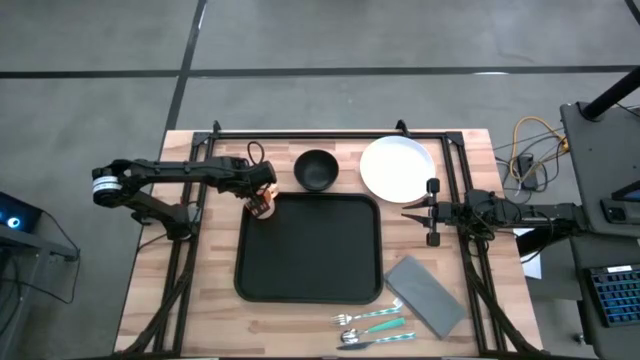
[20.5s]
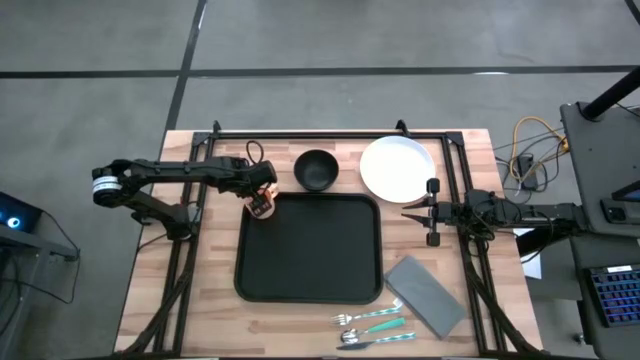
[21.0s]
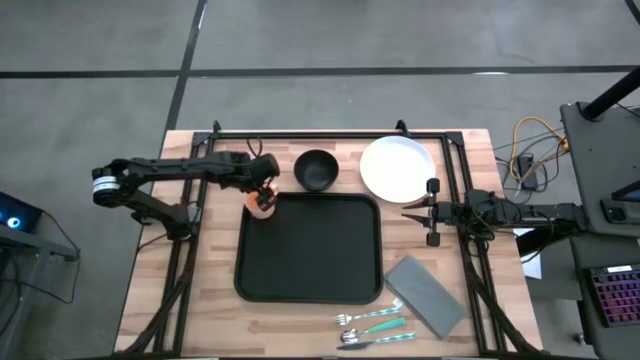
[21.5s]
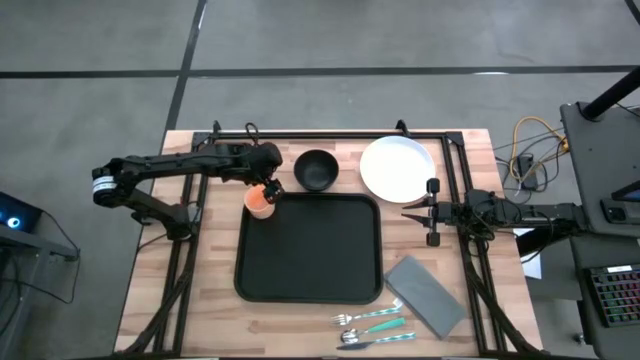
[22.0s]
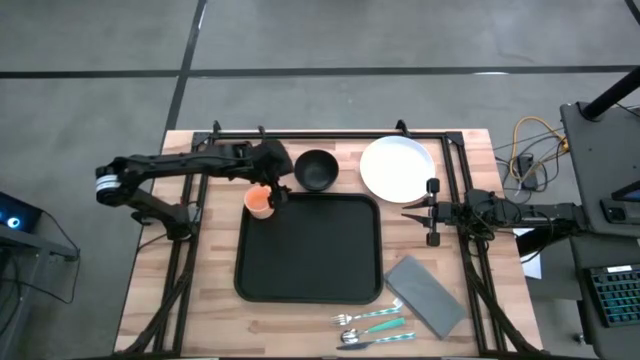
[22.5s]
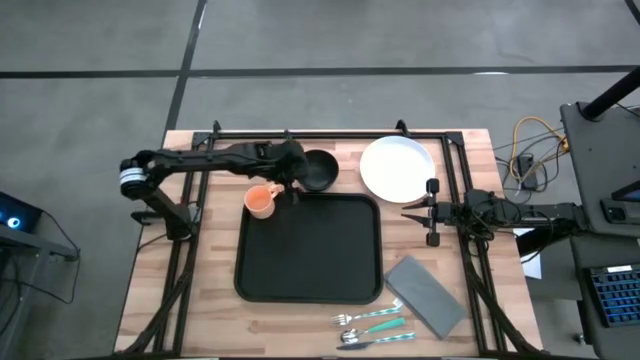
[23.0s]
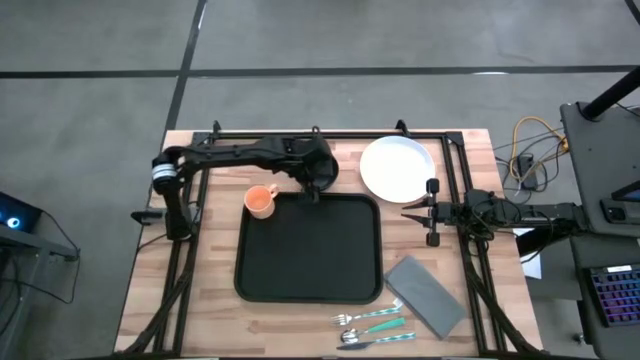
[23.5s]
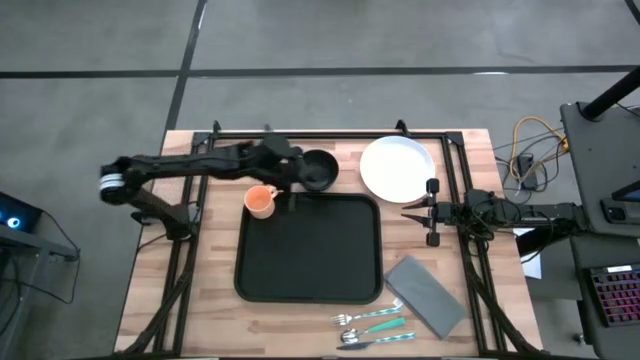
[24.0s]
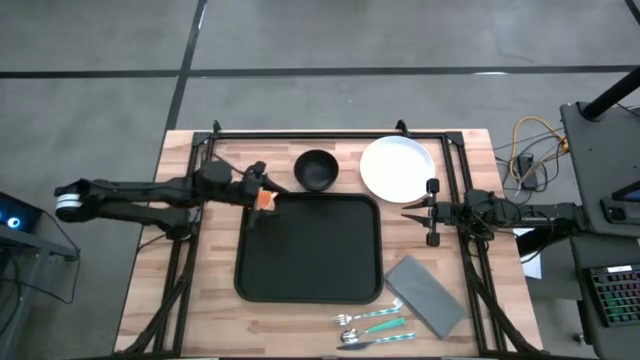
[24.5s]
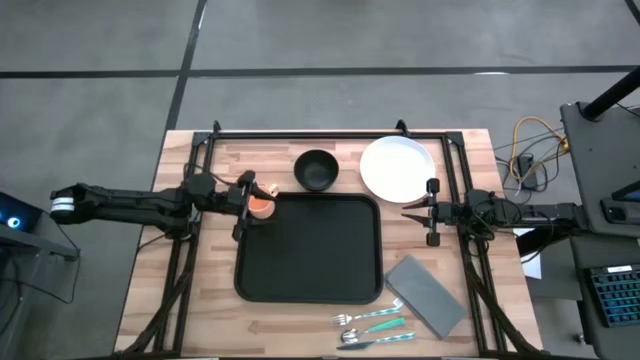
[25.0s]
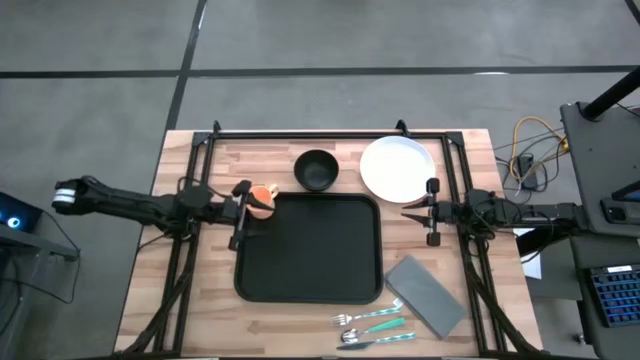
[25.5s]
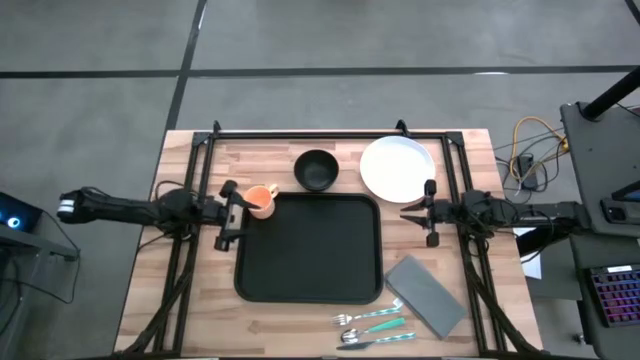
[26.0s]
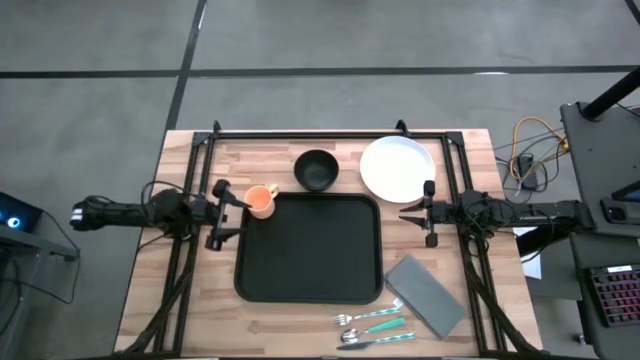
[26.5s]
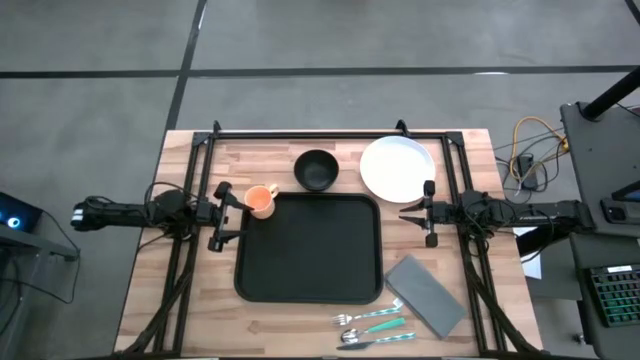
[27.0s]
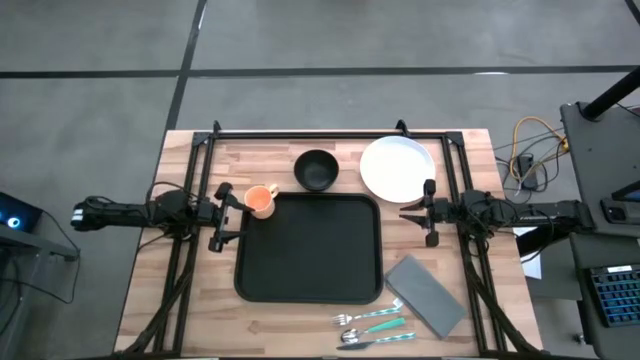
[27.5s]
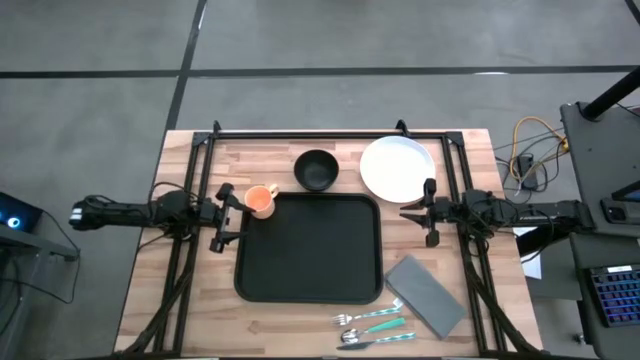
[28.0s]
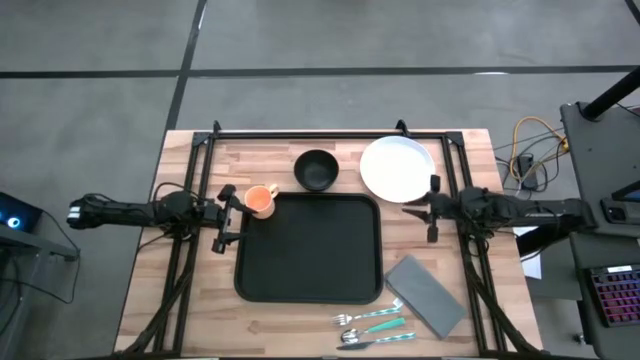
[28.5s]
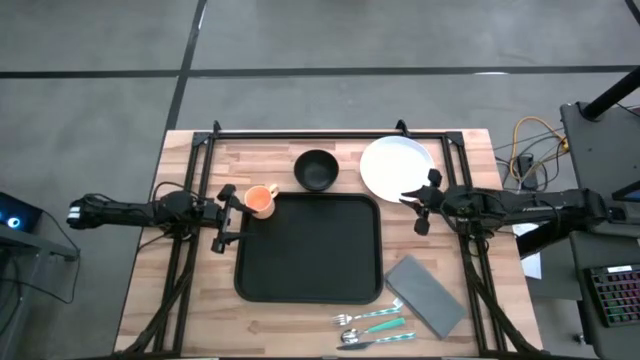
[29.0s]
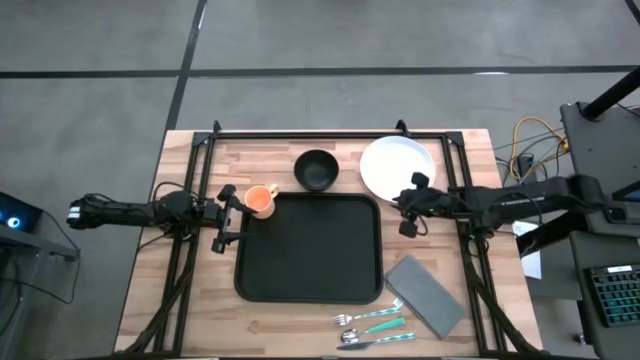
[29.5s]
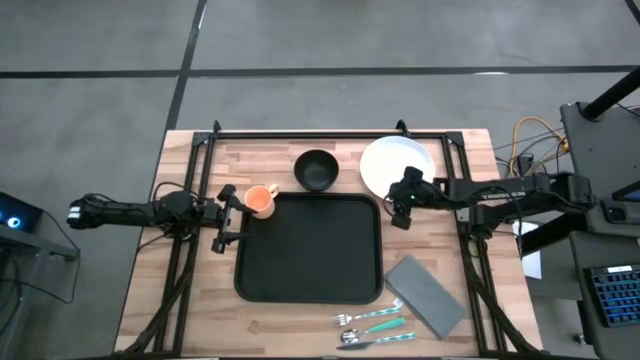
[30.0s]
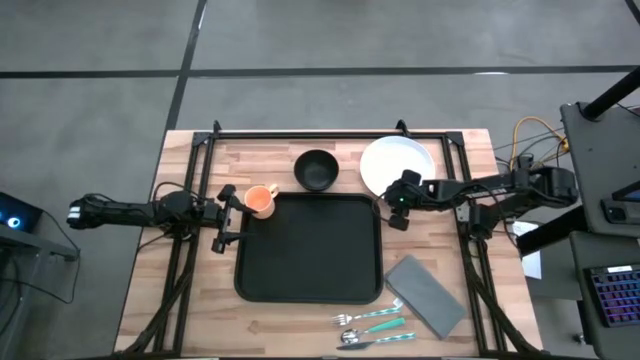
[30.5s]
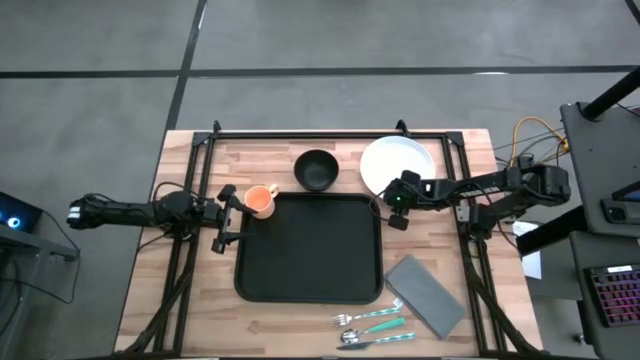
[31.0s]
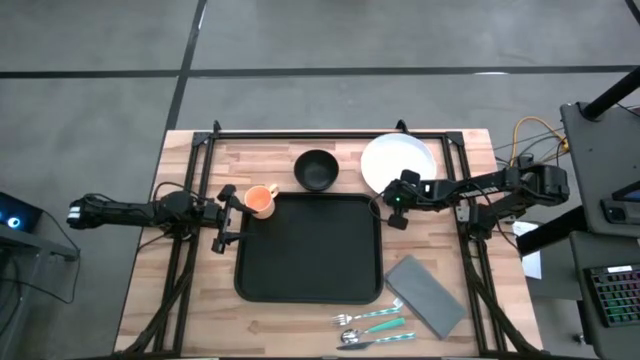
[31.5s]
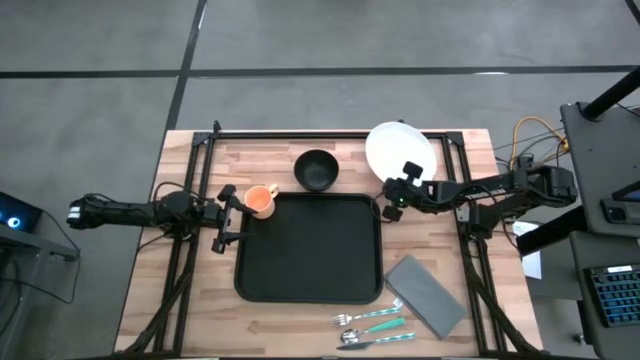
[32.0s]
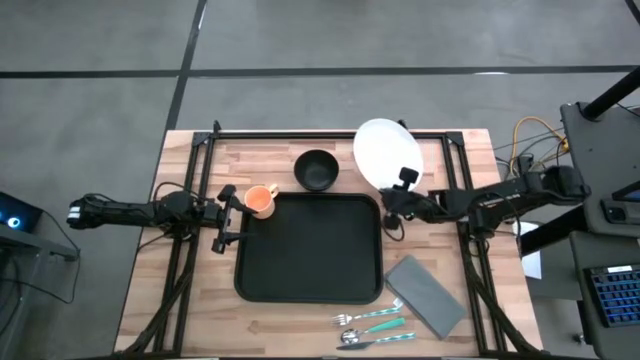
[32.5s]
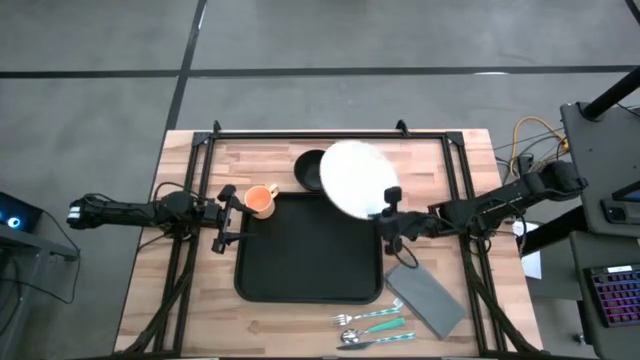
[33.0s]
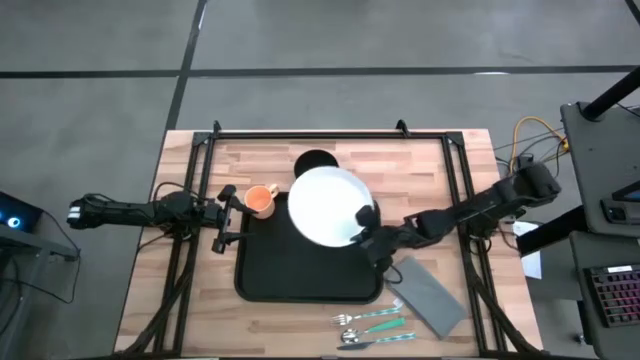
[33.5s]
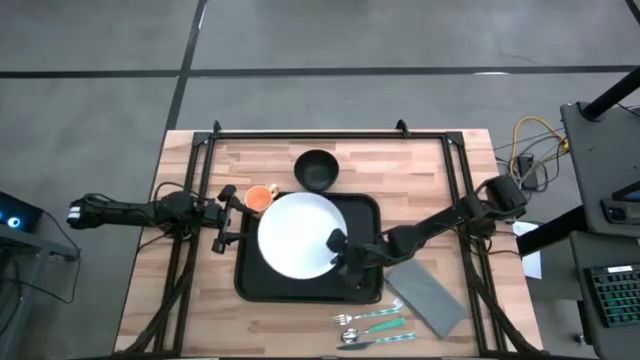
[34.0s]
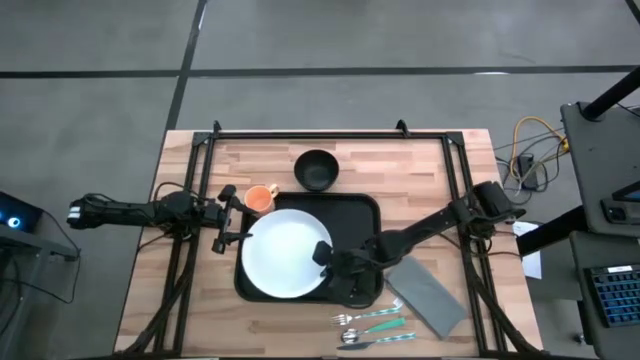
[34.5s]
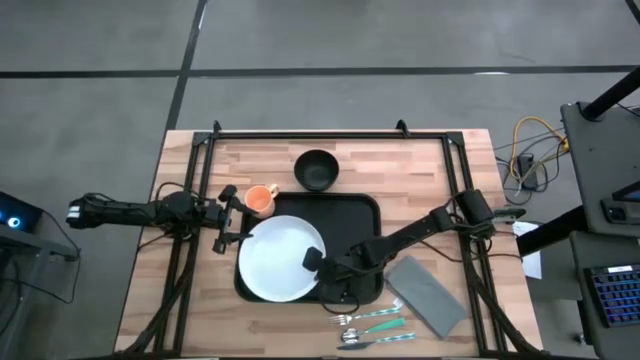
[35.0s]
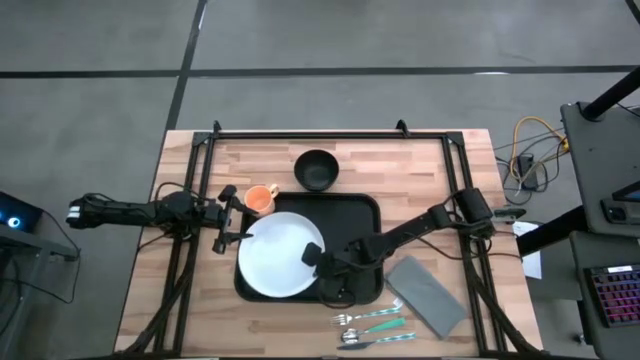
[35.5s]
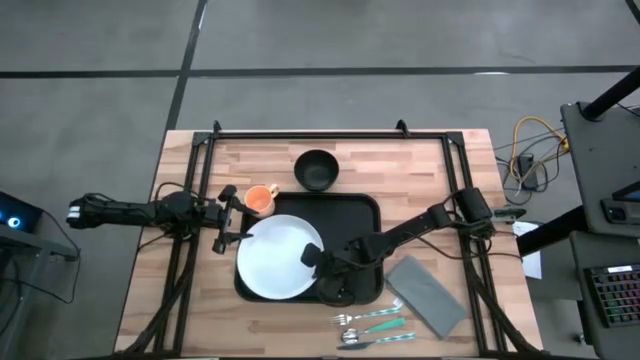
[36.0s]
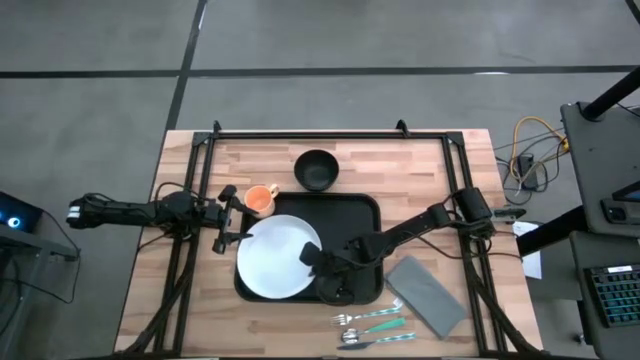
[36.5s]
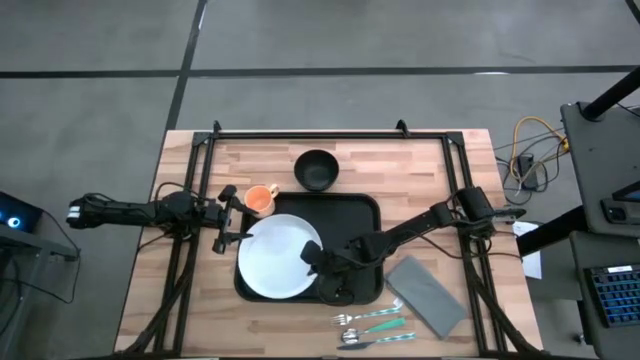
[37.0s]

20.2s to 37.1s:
Task: Set up tray
Put the white plate on the left side of the black tray

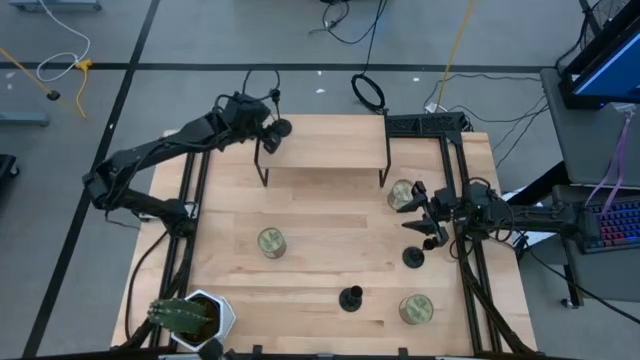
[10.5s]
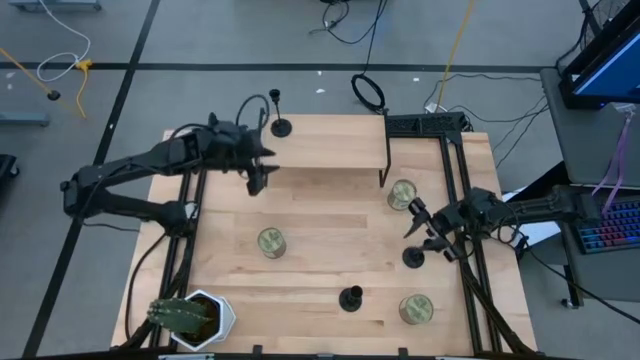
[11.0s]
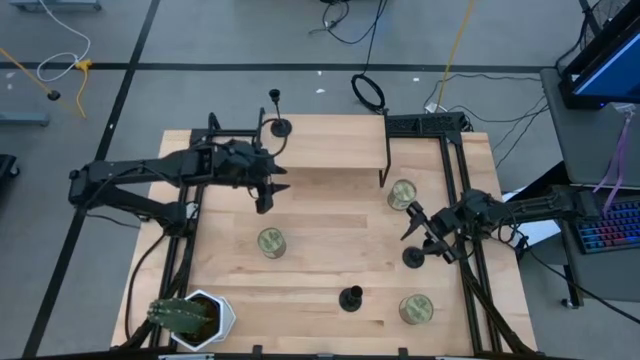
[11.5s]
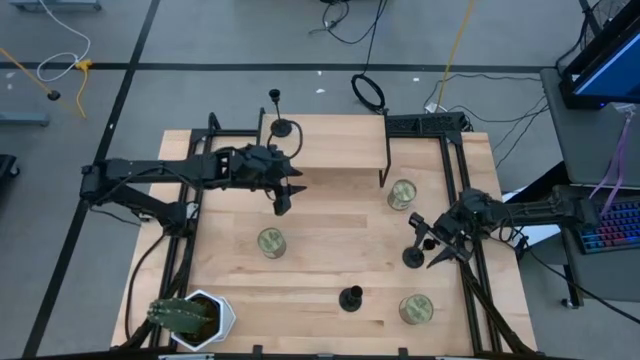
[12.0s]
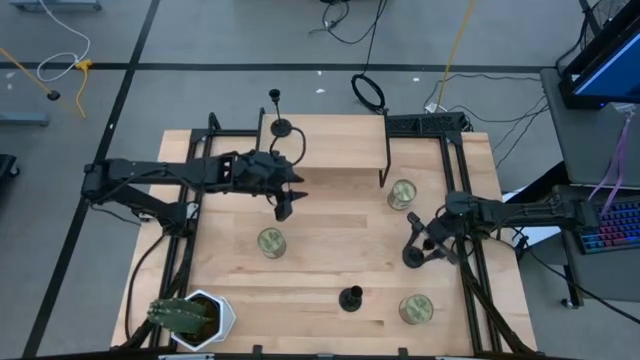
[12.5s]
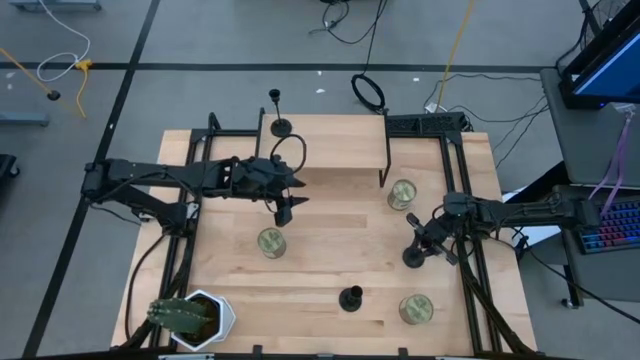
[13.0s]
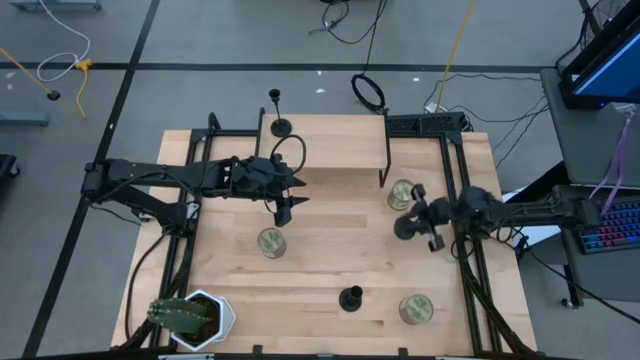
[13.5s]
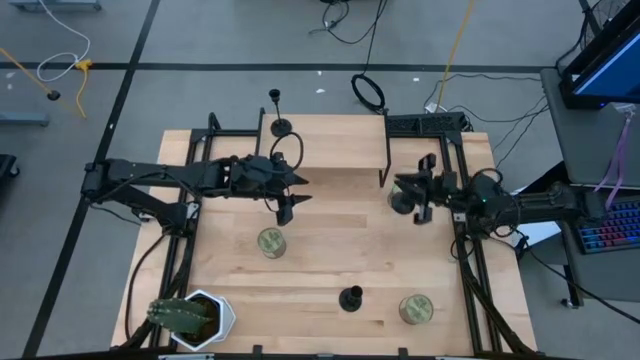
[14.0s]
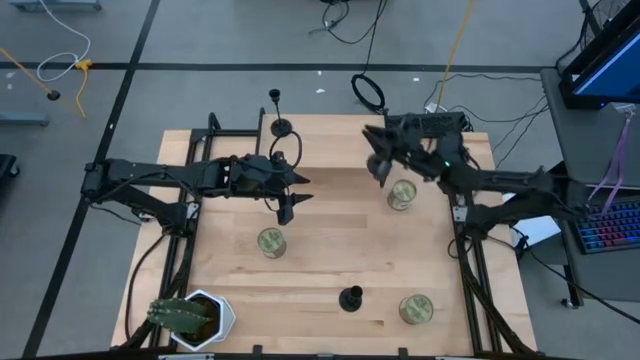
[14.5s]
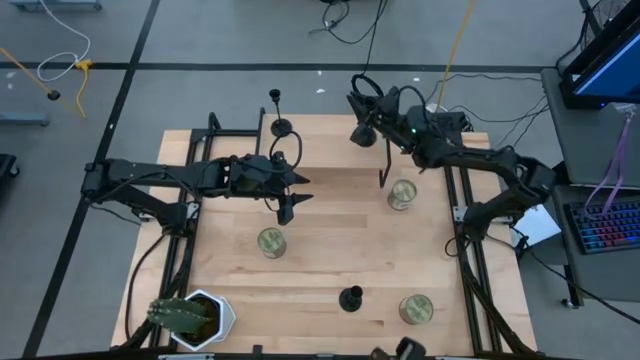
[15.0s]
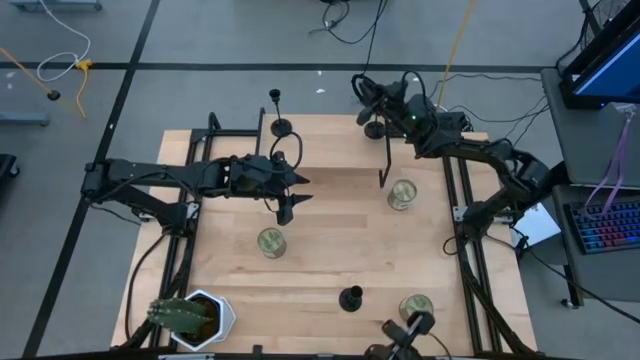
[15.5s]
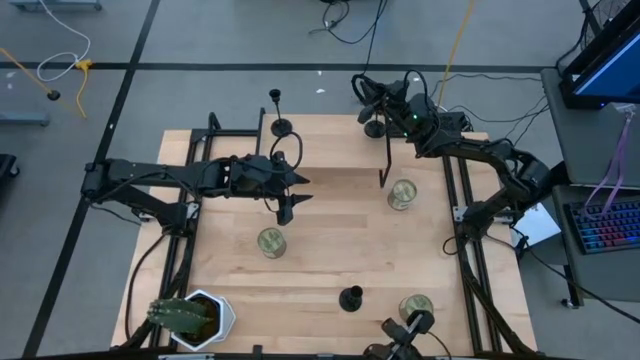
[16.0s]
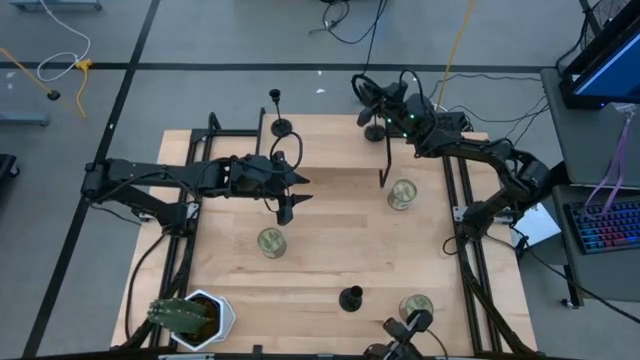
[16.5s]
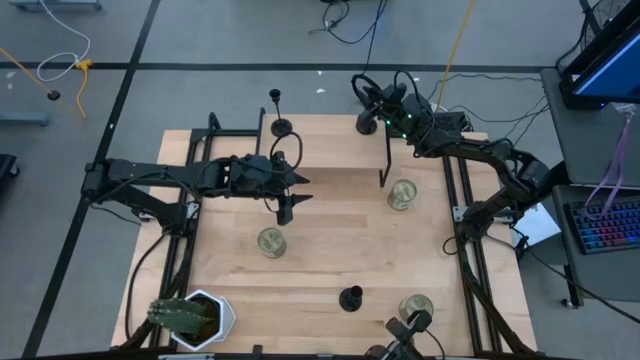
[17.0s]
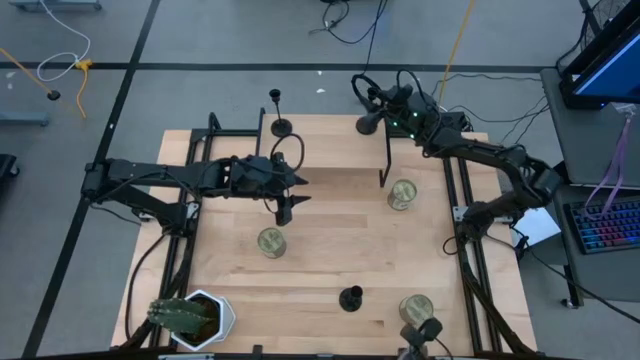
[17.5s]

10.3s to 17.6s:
Task: Pick & Place candle stick holders
Put the top black candle holder on the shelf
